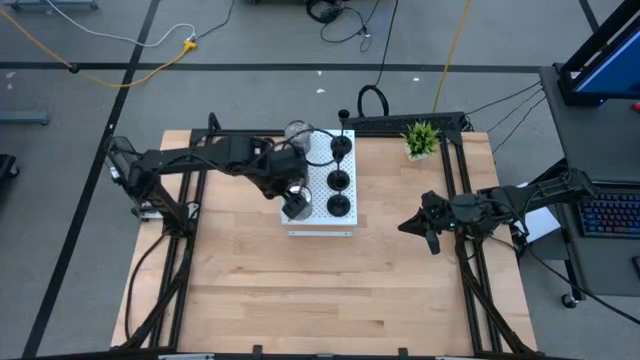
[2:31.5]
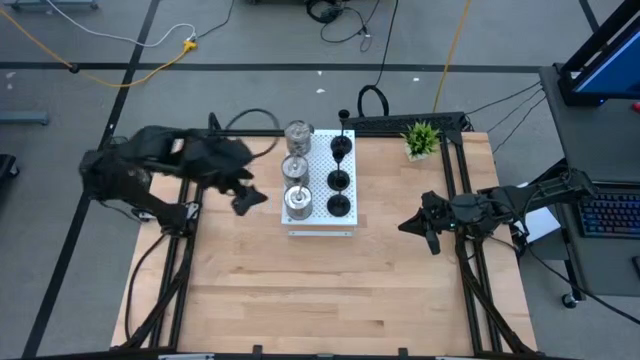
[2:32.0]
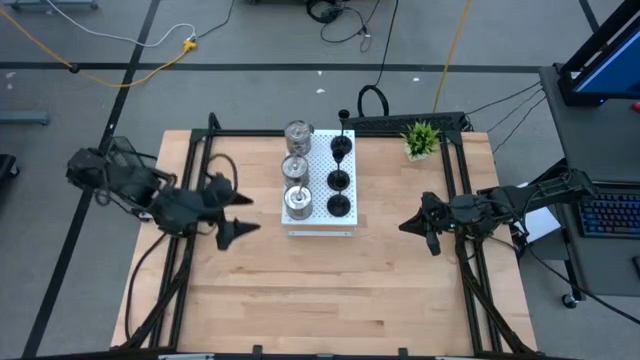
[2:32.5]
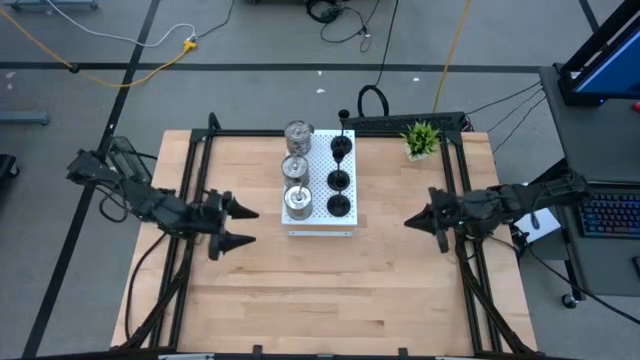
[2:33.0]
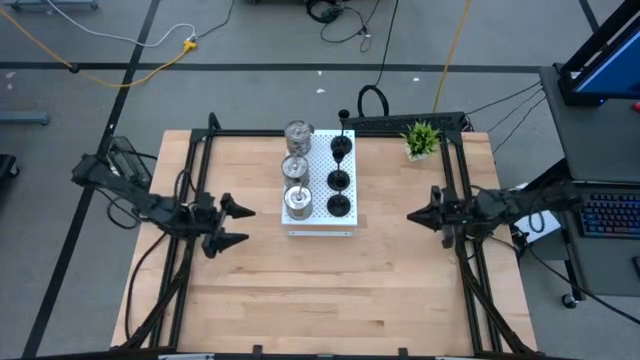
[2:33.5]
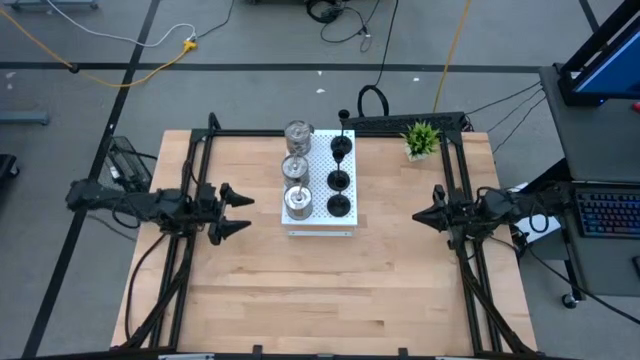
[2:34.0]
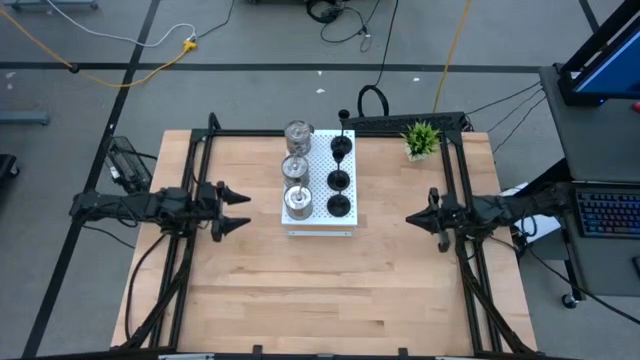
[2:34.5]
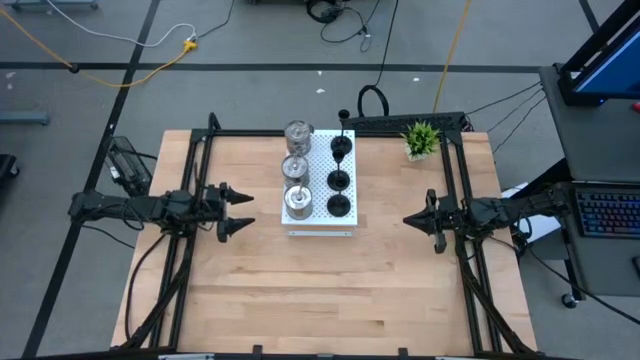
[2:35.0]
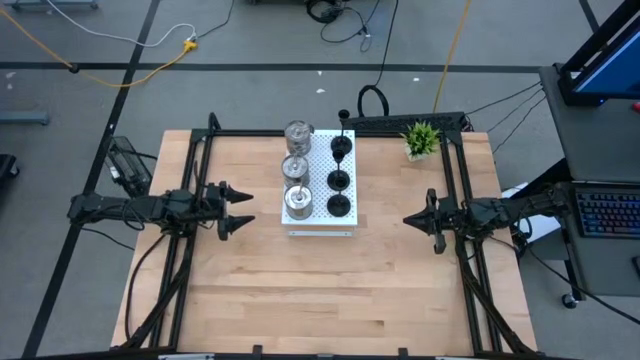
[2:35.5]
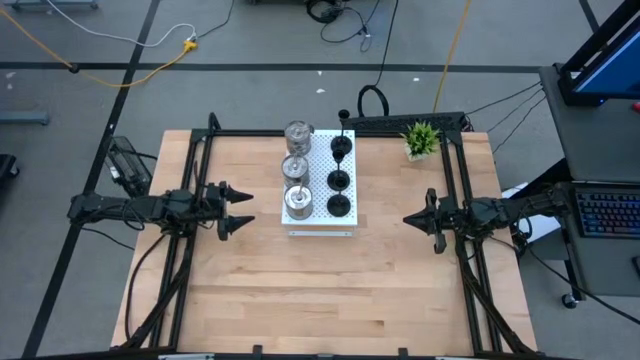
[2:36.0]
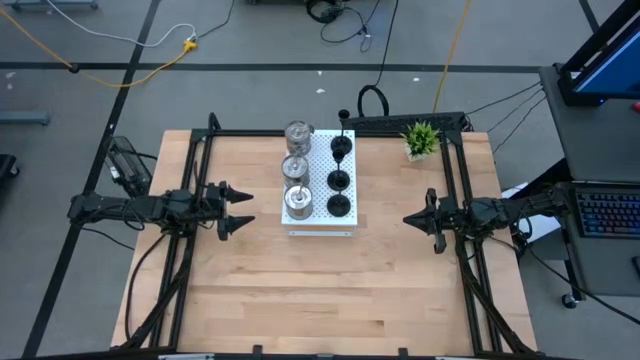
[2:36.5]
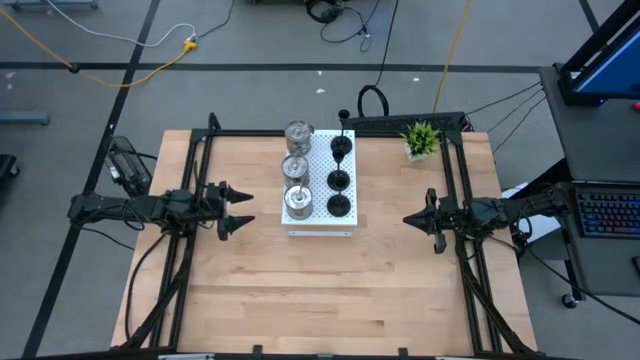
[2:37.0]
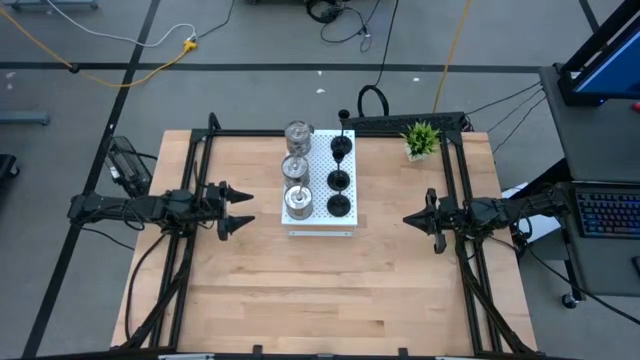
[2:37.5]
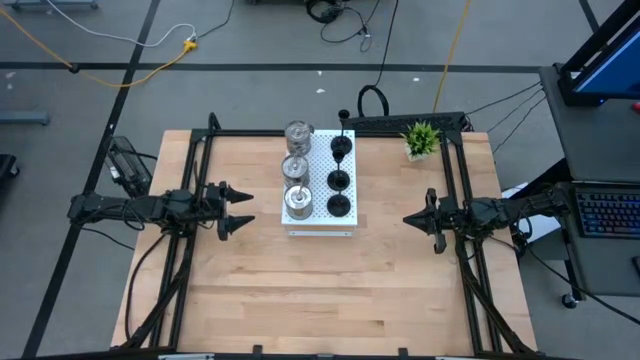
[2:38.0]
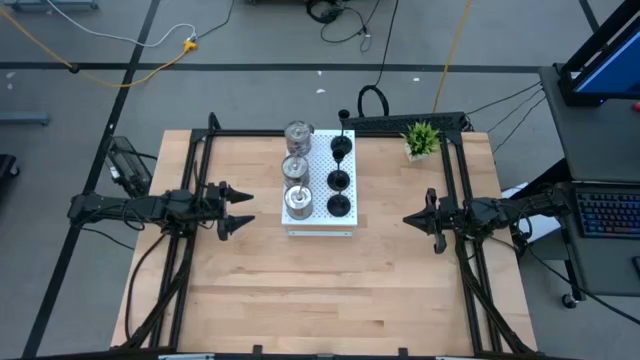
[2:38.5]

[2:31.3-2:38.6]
Task: Pick & Place candle stick holders
Return to Home Position

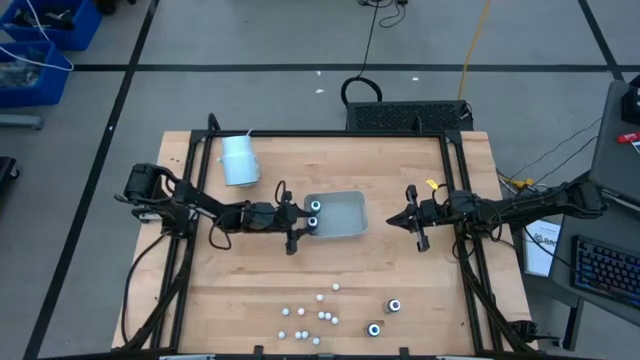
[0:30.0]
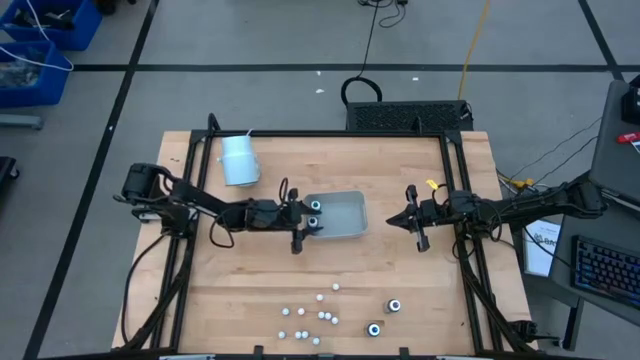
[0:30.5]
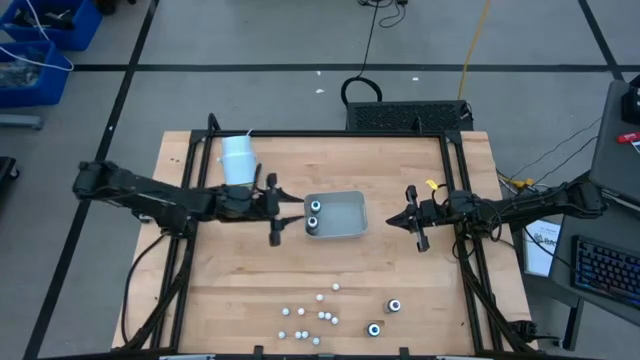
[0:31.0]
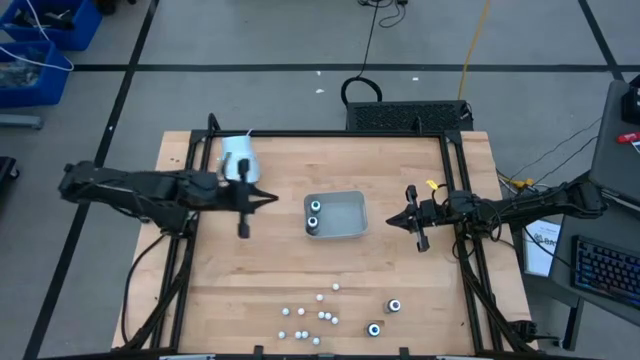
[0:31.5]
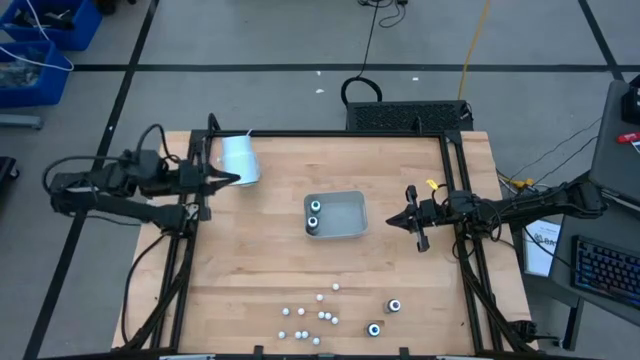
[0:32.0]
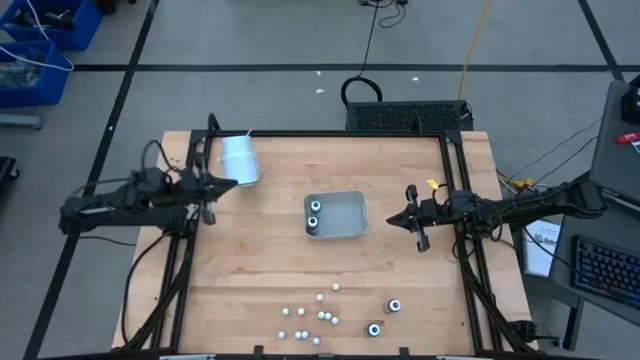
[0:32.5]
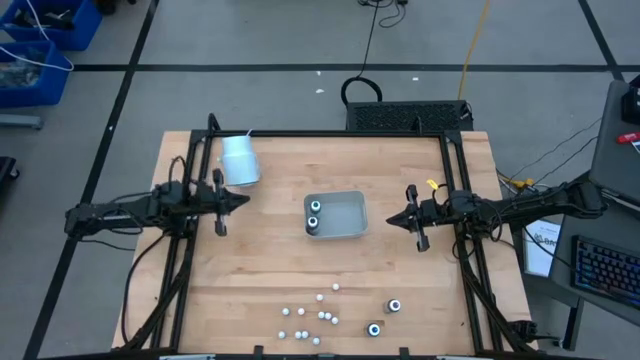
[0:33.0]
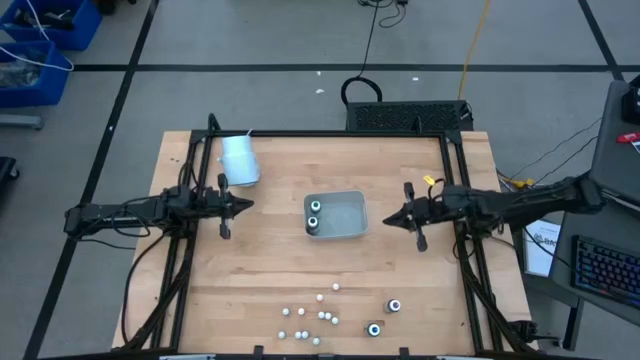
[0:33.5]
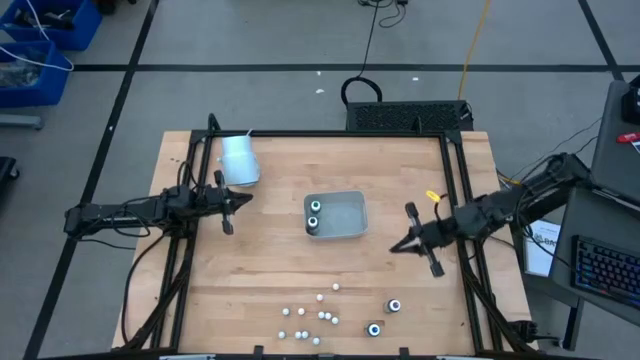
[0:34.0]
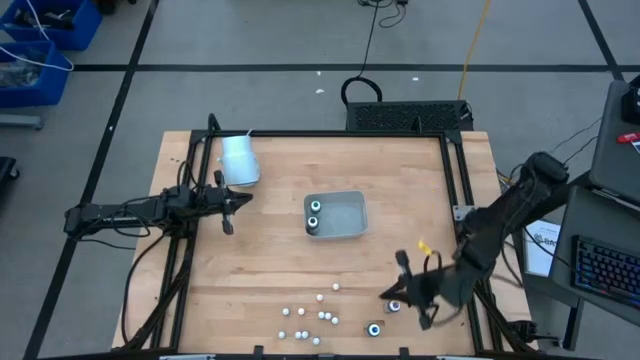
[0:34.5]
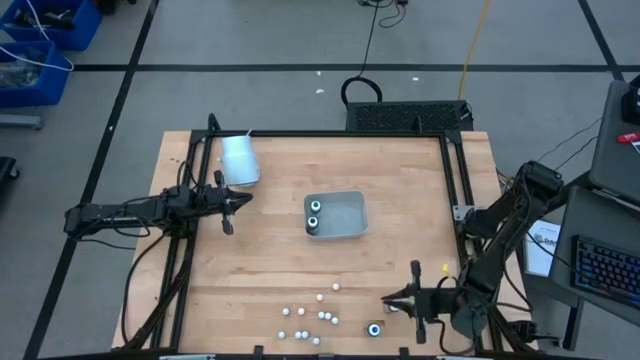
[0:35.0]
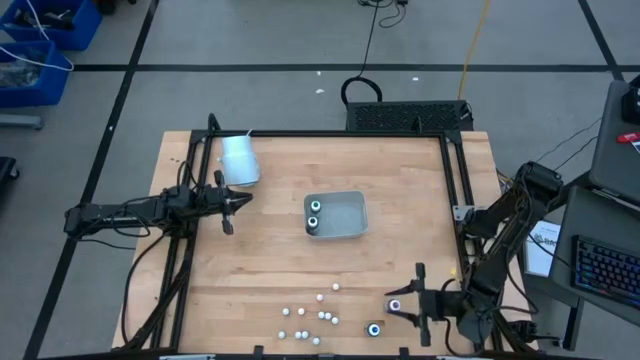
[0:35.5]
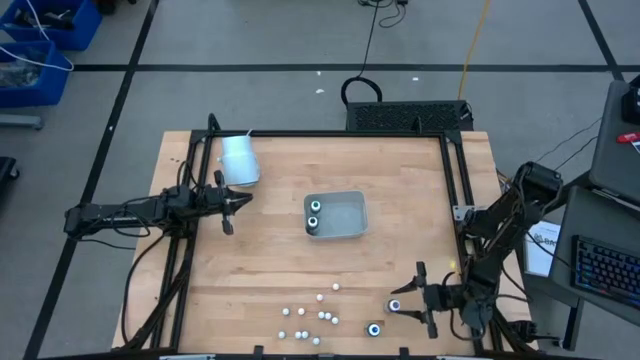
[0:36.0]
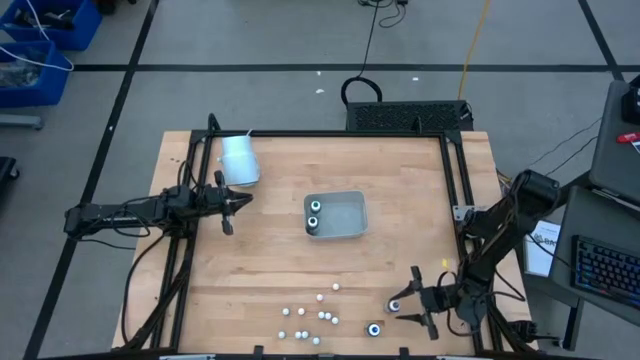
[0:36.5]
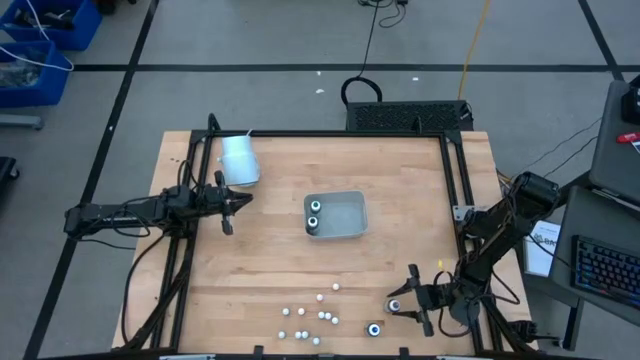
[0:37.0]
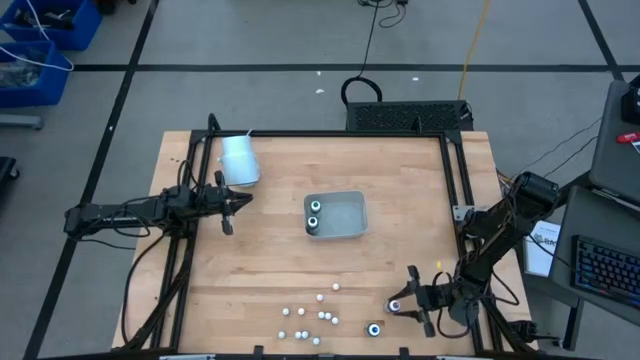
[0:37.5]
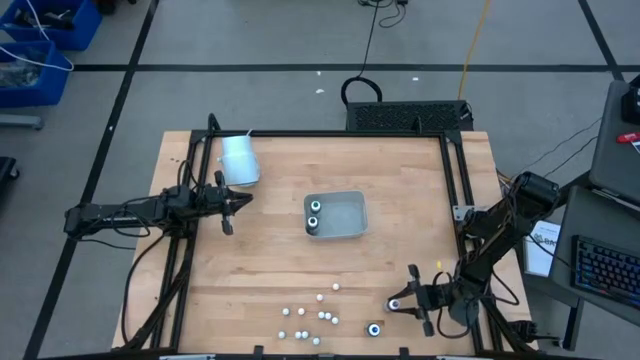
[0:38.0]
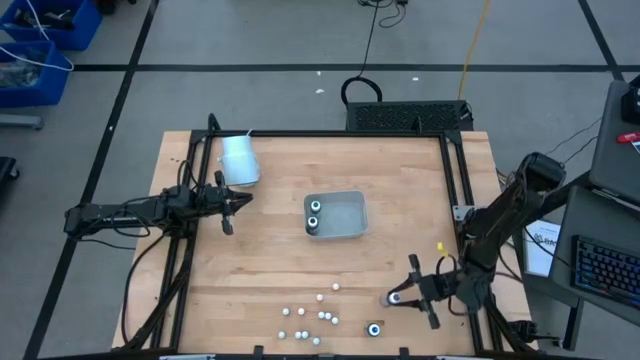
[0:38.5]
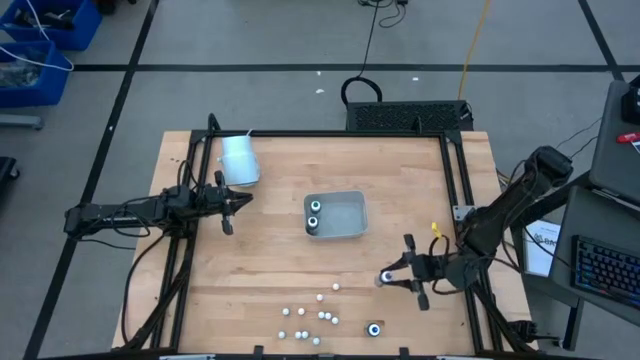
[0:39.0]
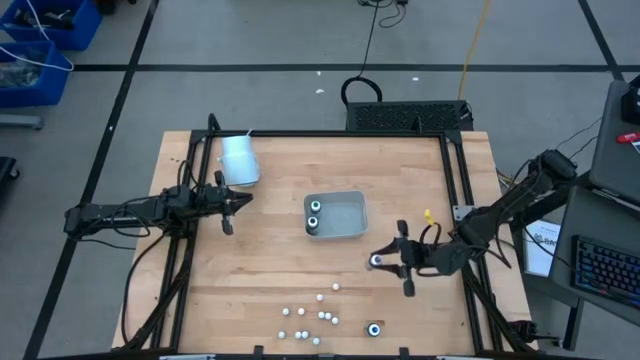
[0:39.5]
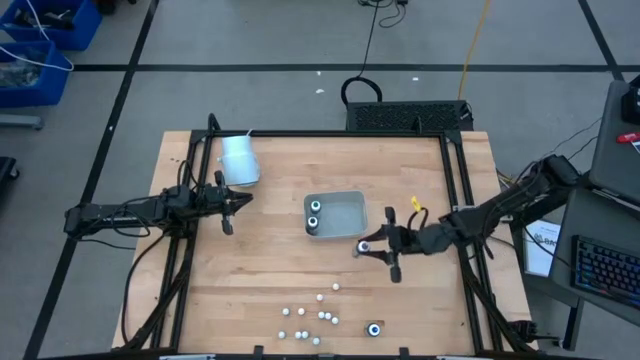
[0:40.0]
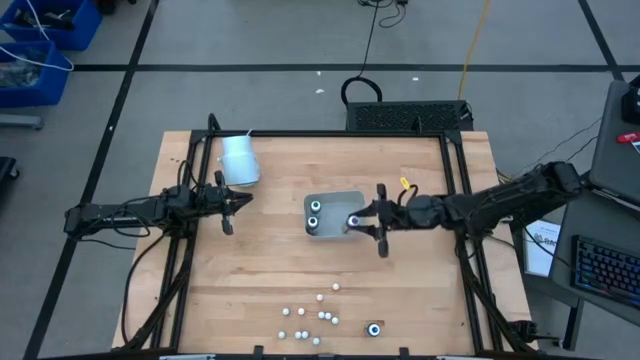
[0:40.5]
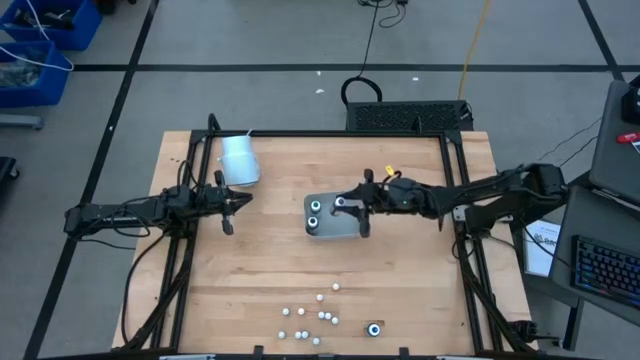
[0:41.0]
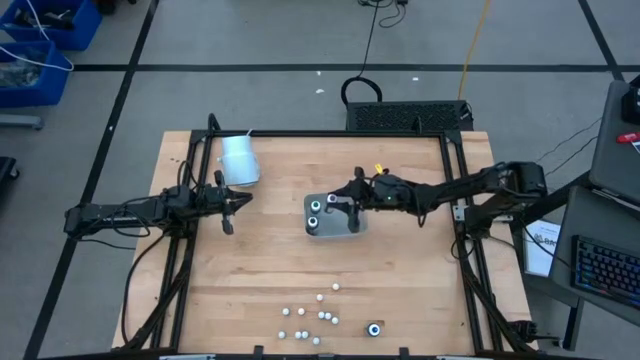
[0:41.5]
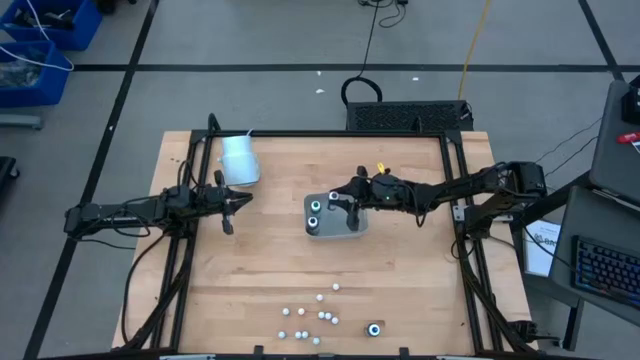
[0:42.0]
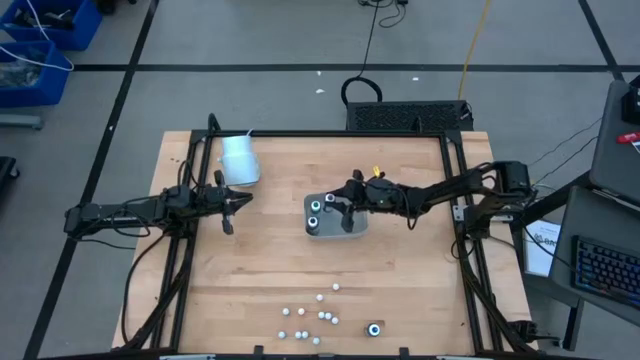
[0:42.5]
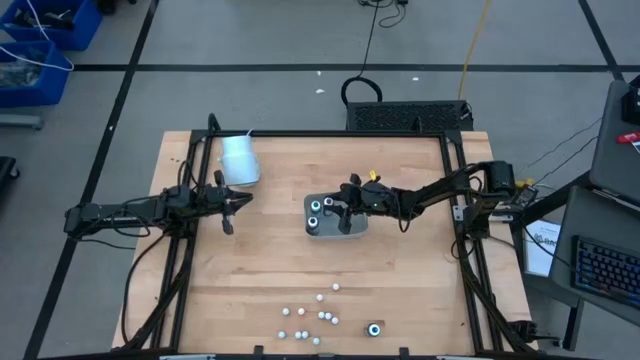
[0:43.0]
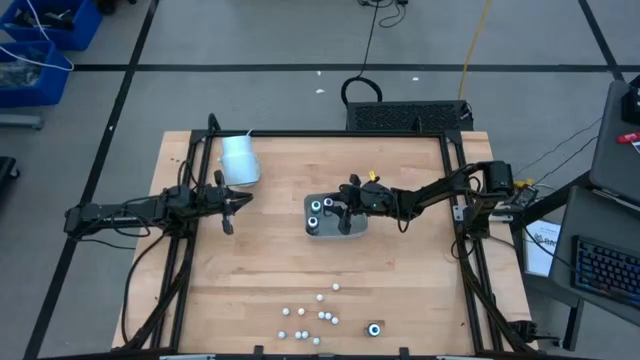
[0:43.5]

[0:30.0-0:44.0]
Task: Pick & Place food coloring
Put the large violet food coloring bottle into the bin
